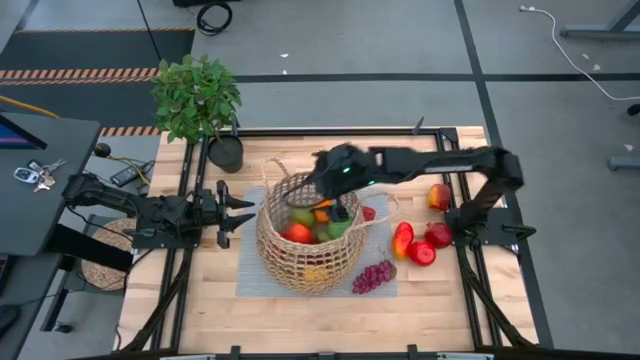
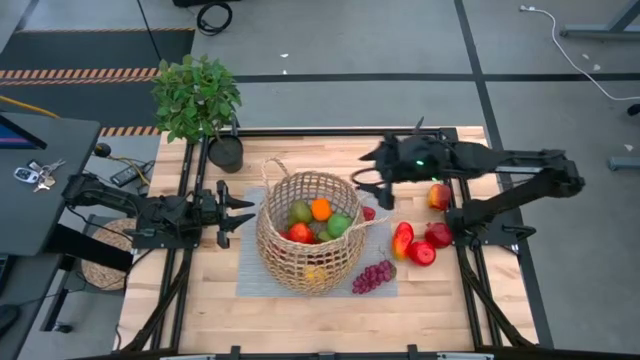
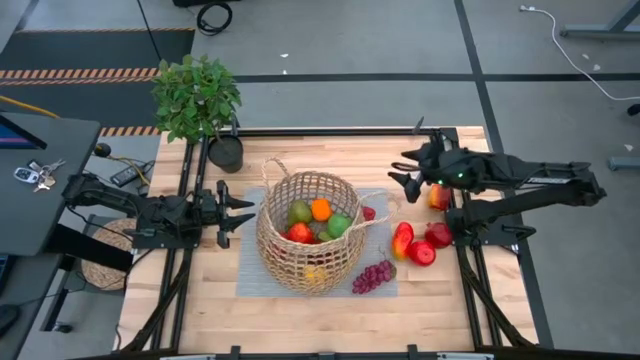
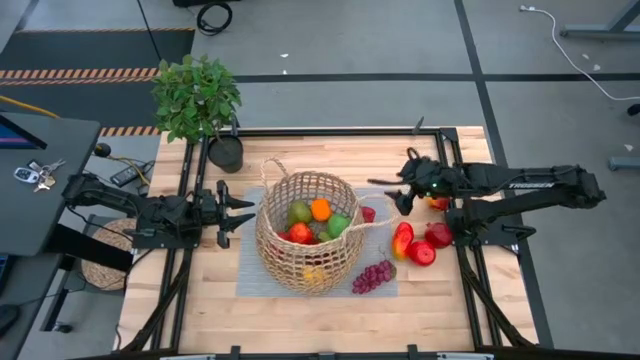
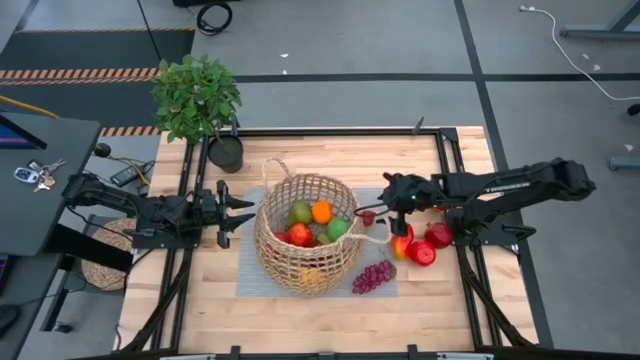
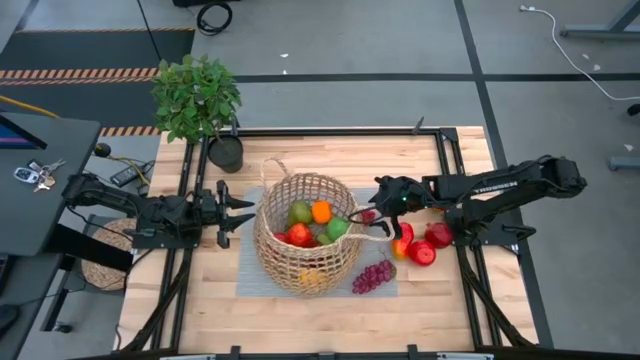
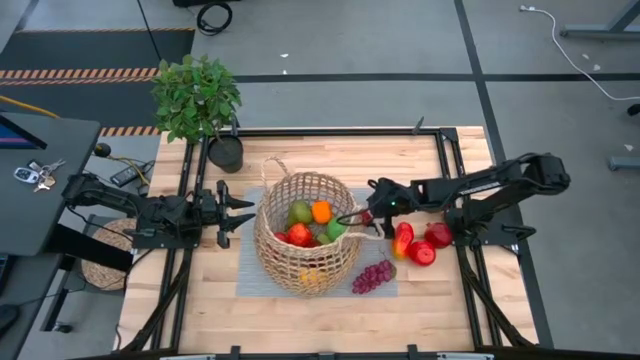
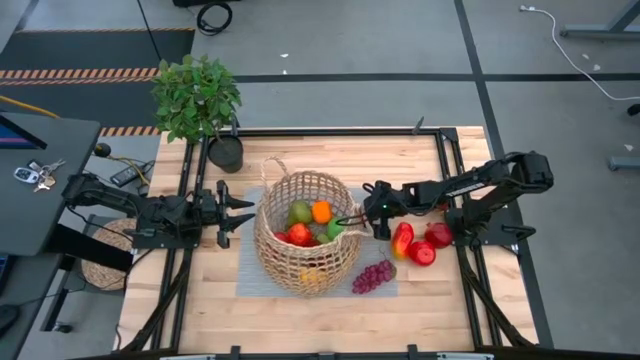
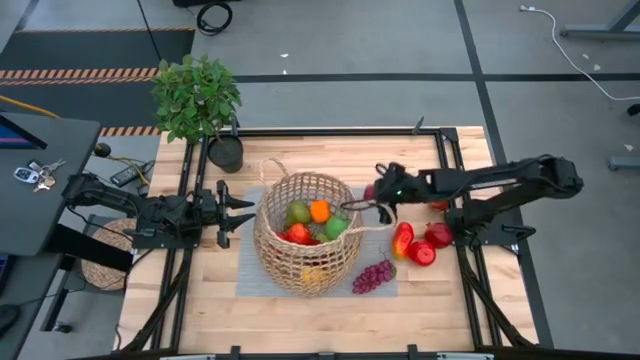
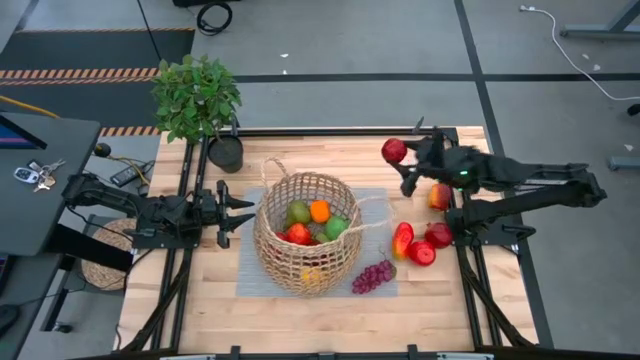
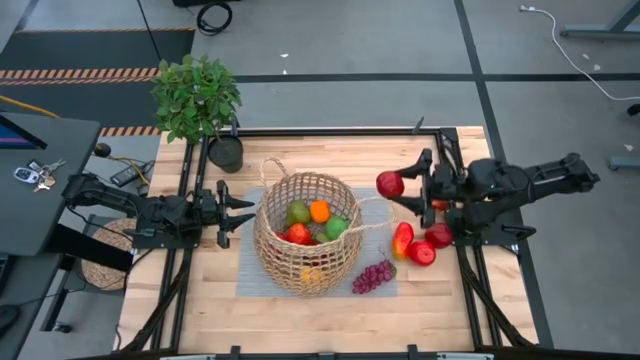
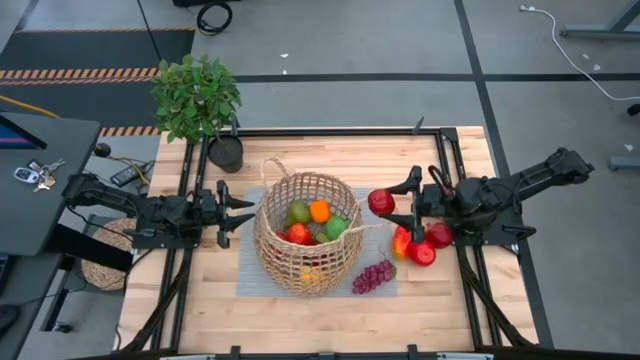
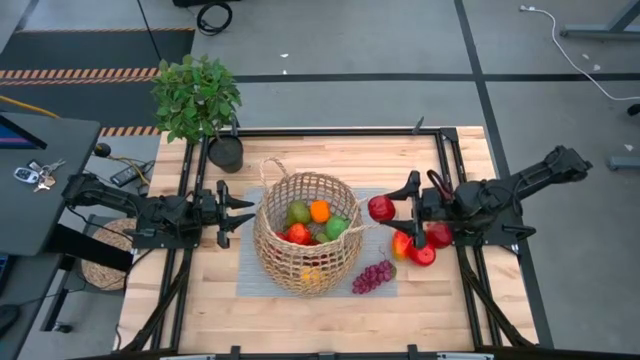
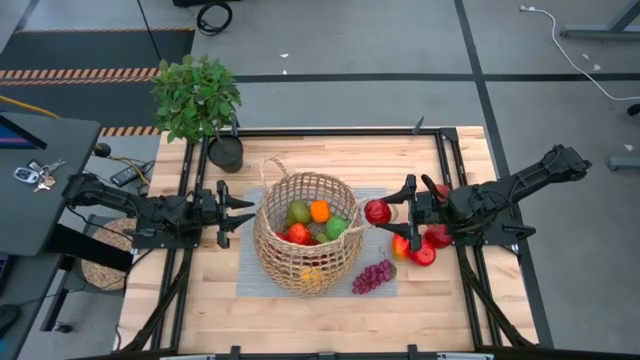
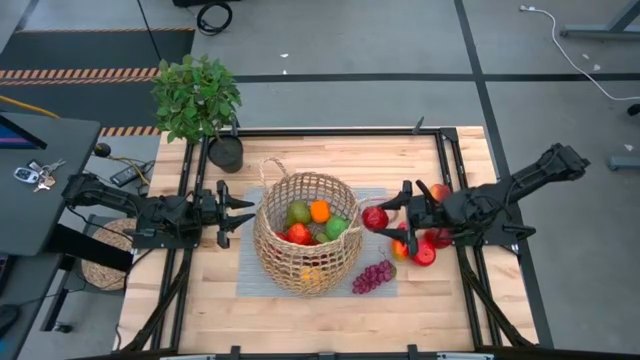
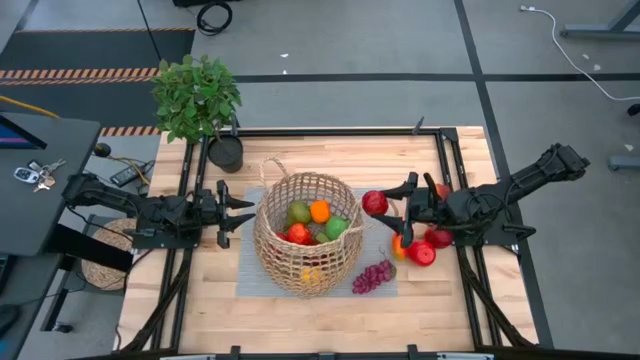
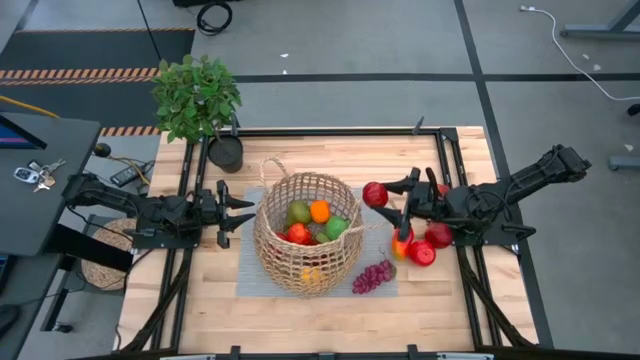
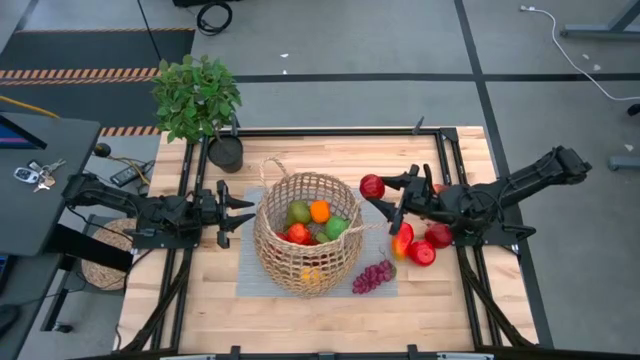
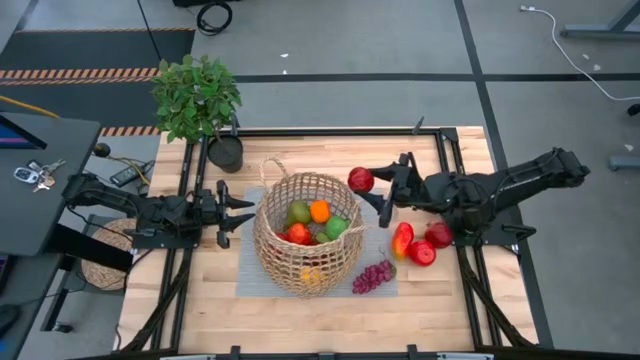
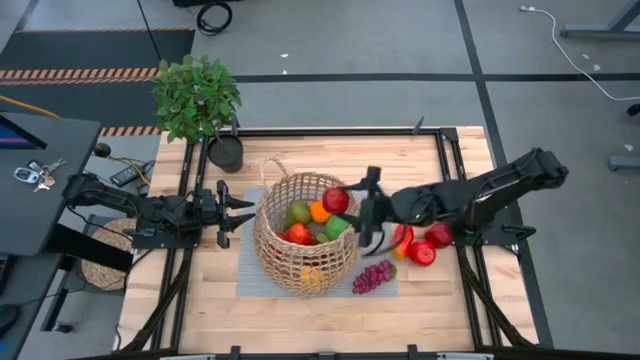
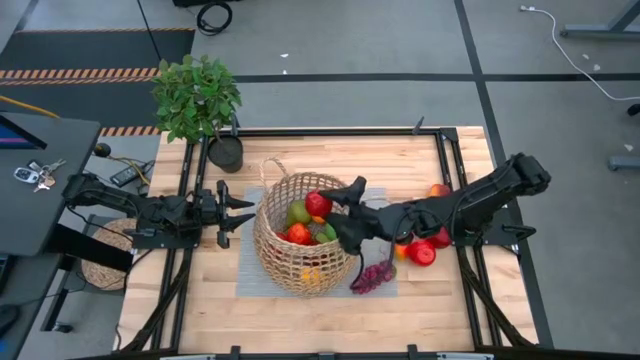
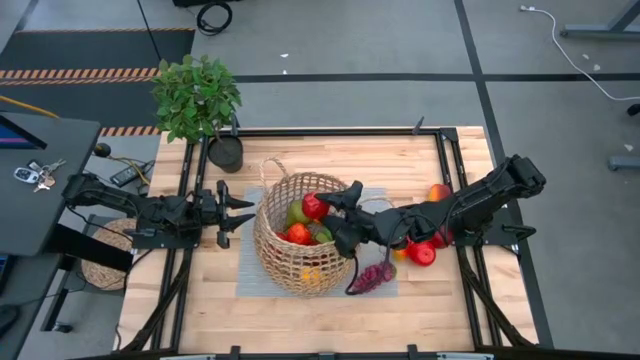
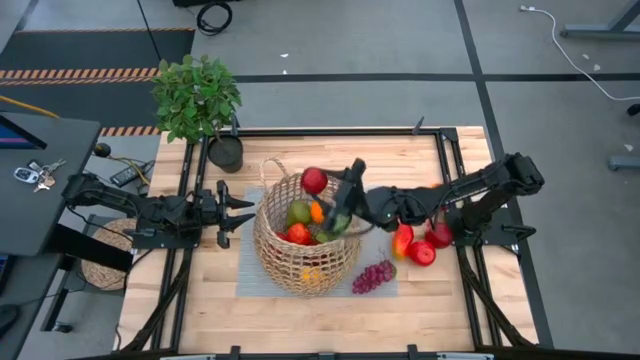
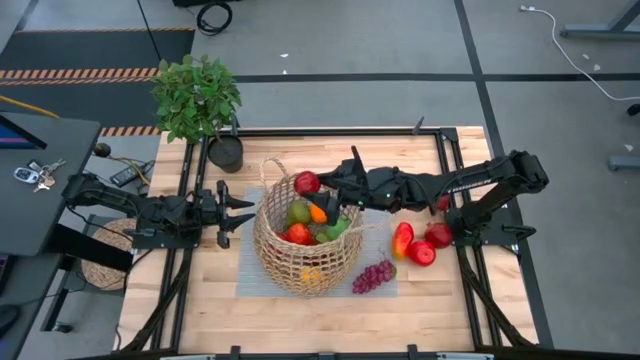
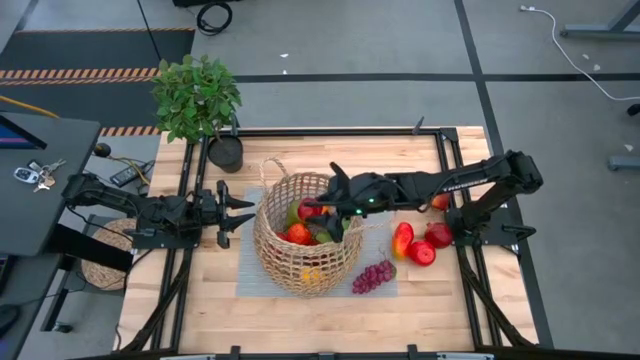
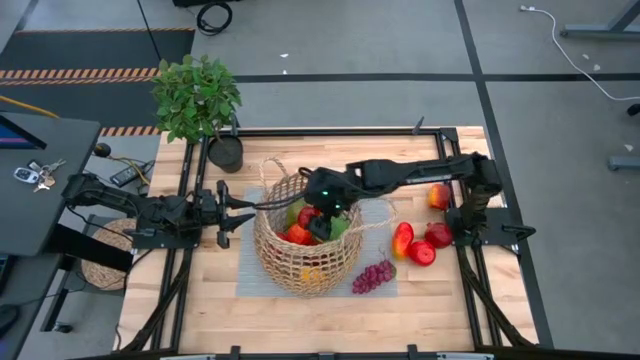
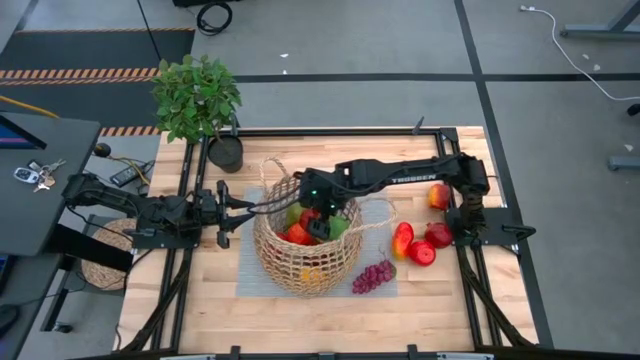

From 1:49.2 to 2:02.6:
Task: Build produce basket
Put the dark red apple into the basket

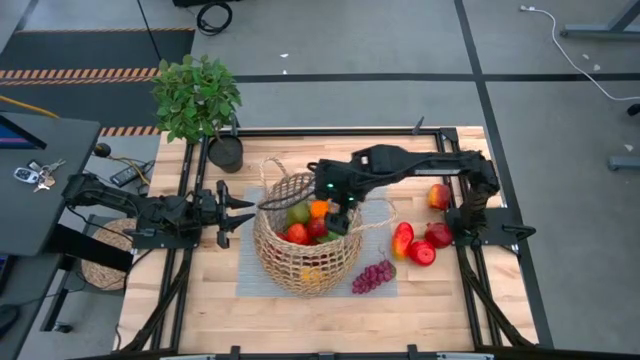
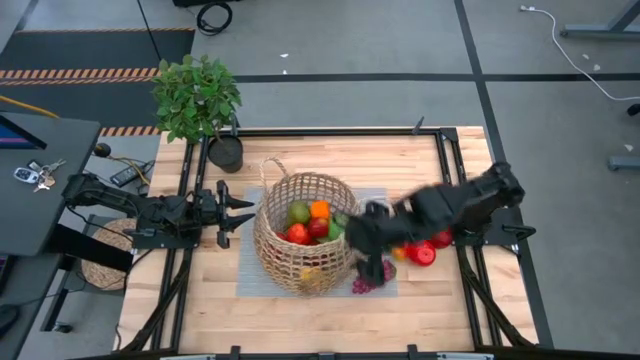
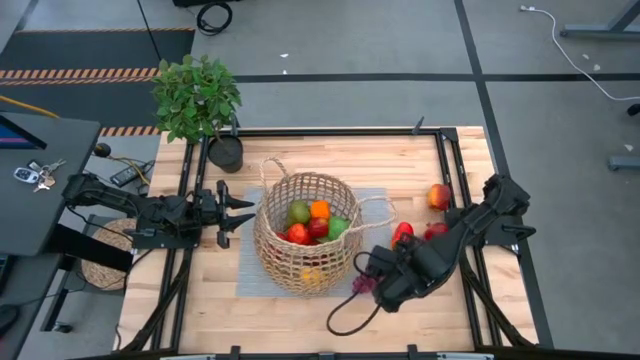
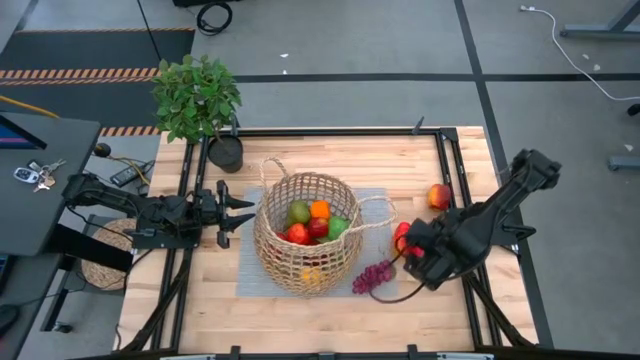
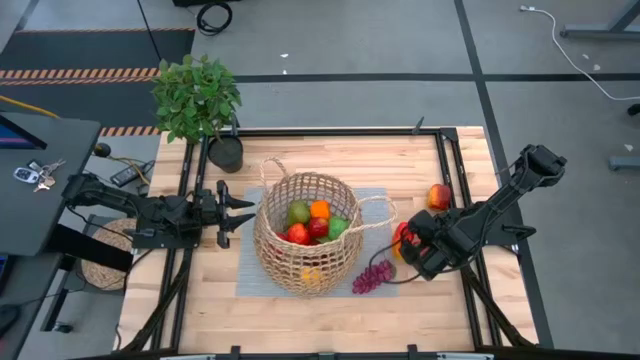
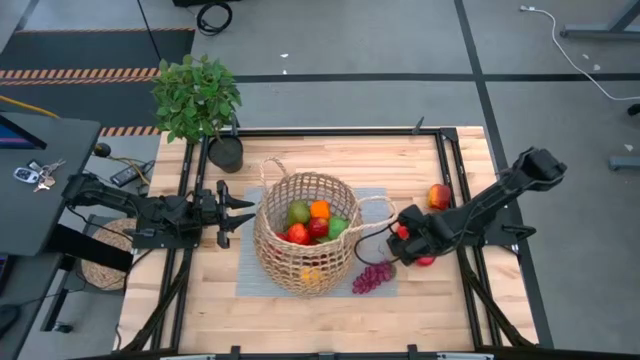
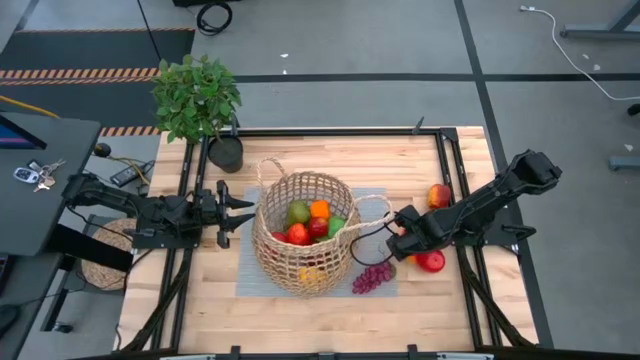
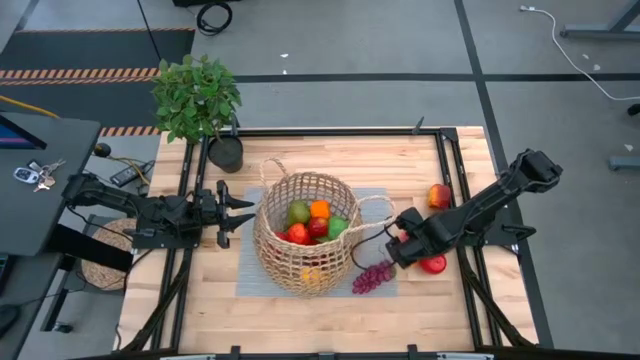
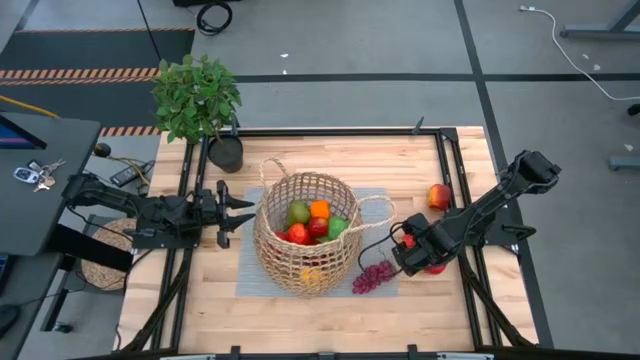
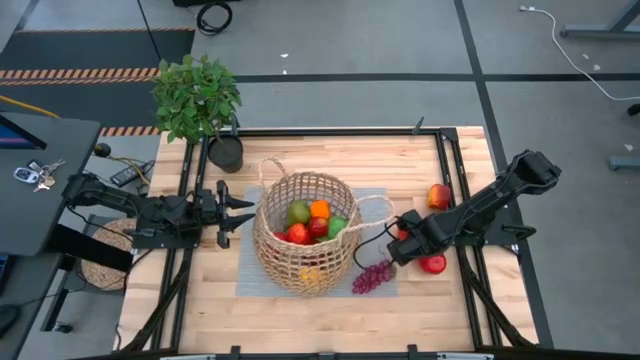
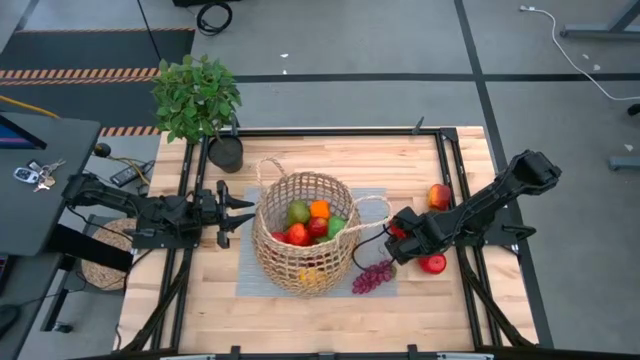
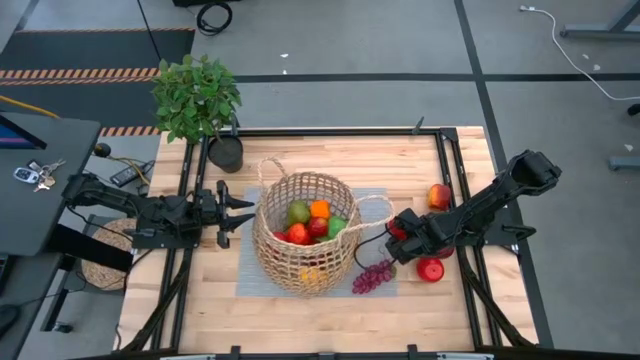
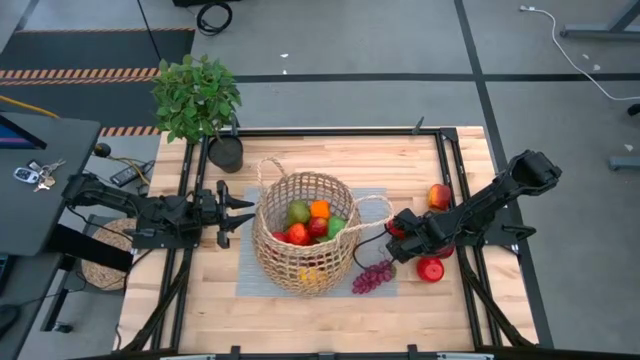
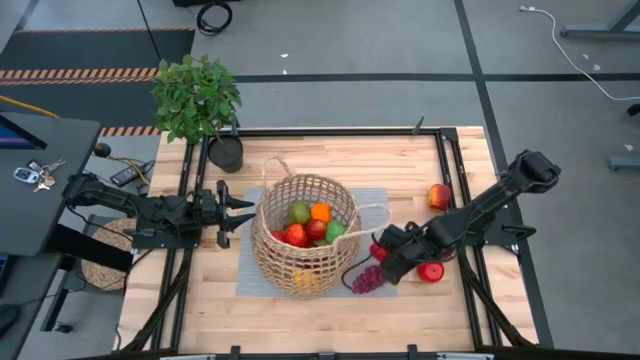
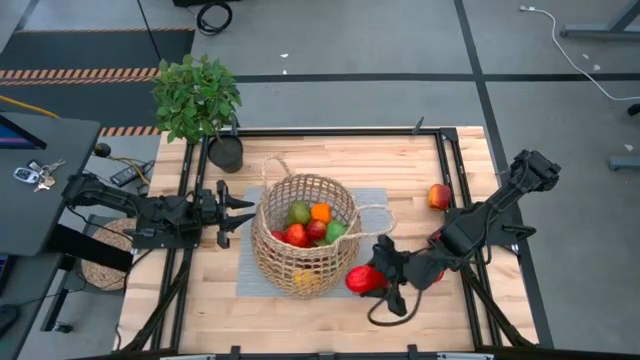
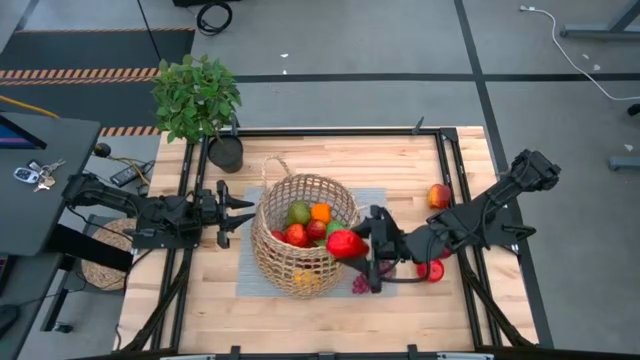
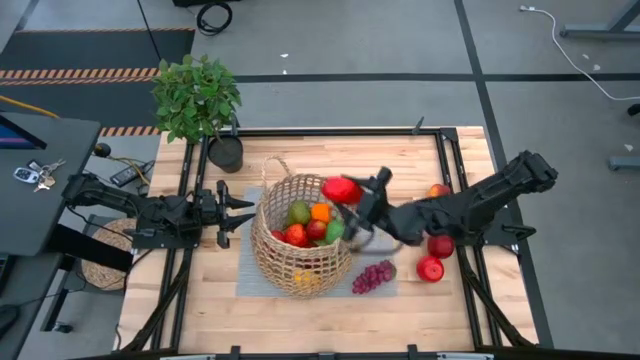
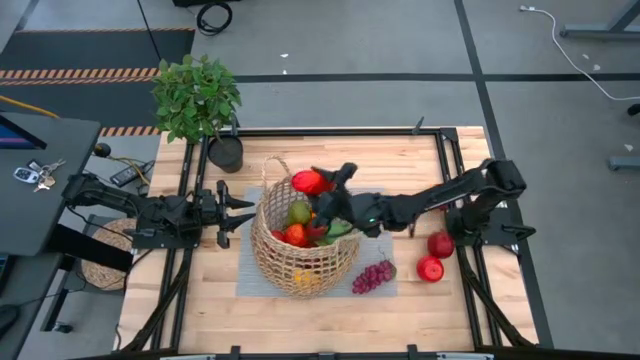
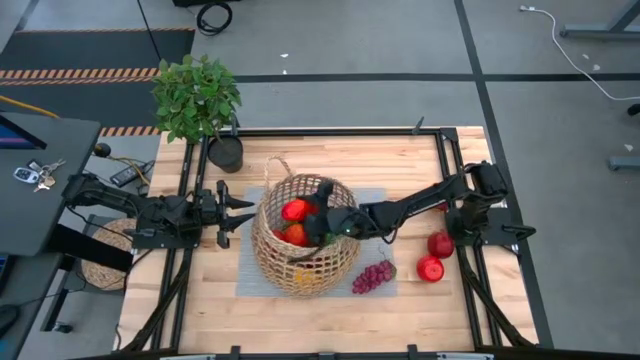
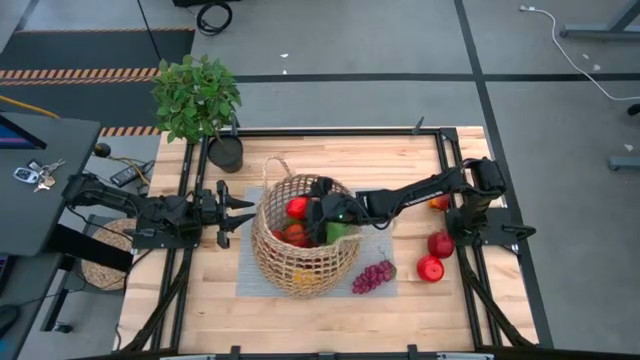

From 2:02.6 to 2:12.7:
Put the mango into the basket
